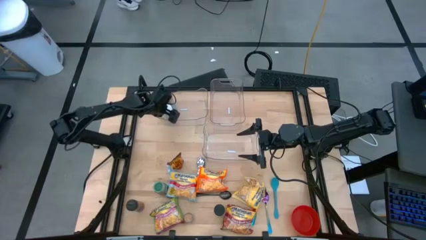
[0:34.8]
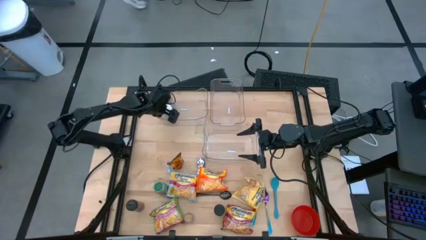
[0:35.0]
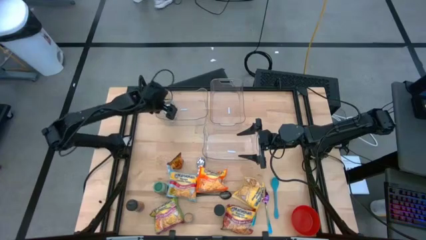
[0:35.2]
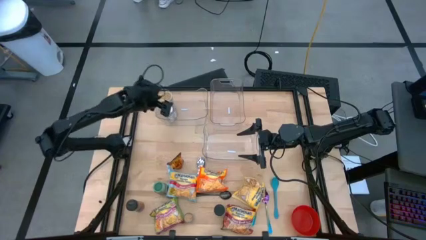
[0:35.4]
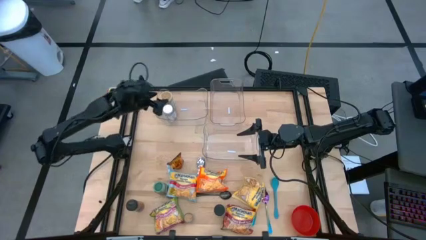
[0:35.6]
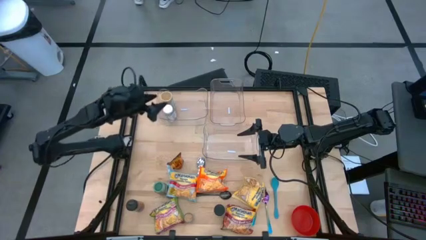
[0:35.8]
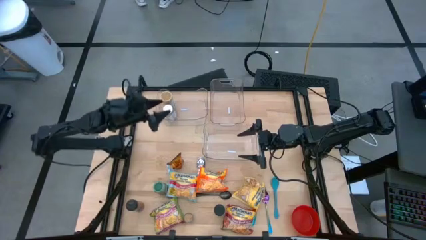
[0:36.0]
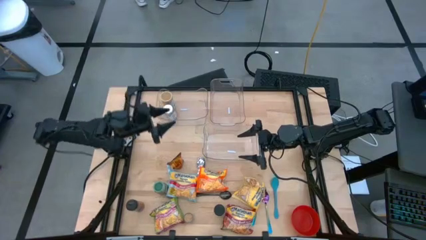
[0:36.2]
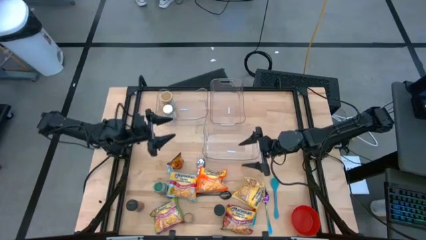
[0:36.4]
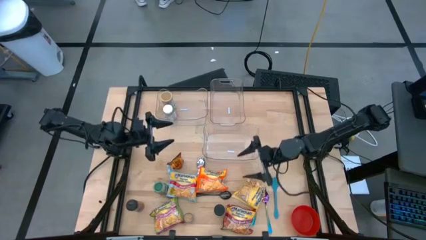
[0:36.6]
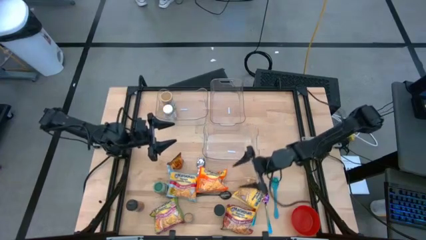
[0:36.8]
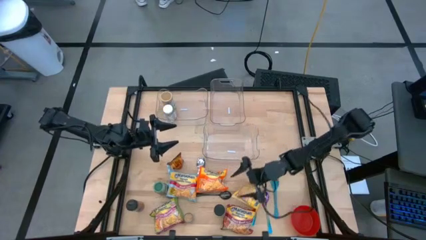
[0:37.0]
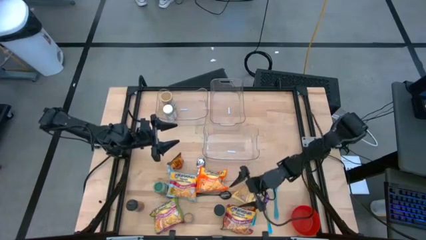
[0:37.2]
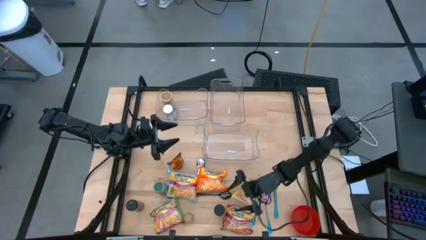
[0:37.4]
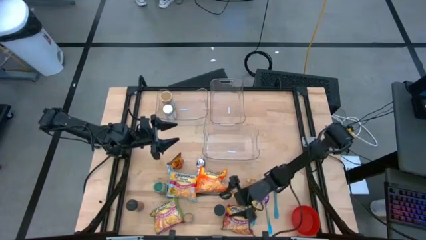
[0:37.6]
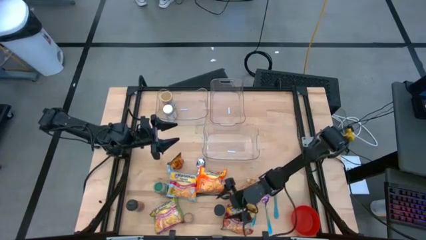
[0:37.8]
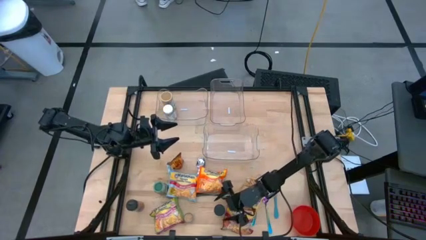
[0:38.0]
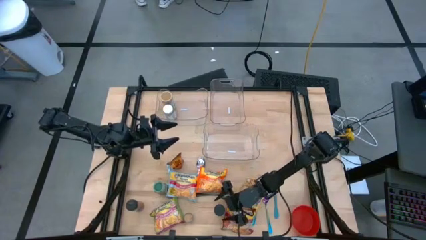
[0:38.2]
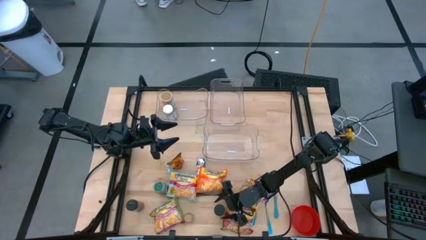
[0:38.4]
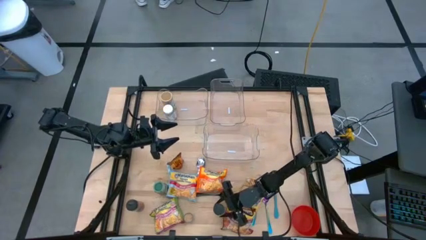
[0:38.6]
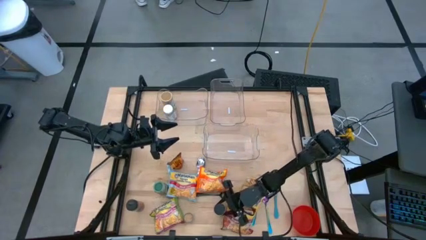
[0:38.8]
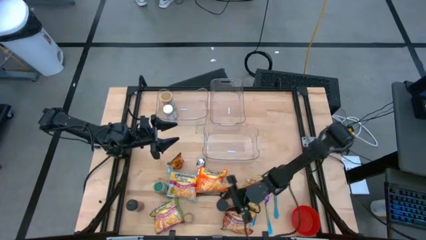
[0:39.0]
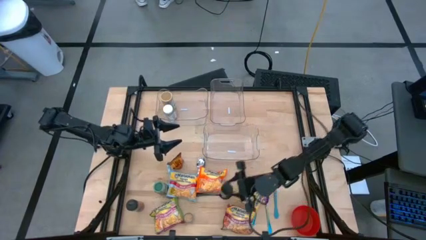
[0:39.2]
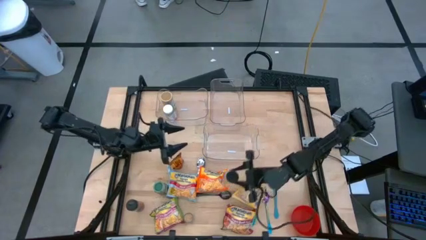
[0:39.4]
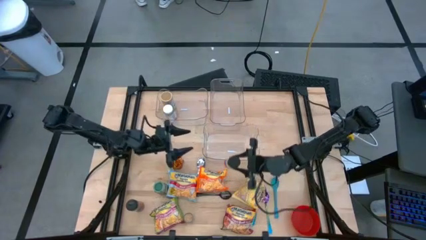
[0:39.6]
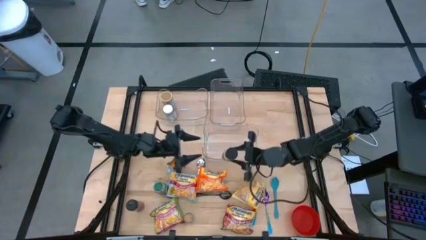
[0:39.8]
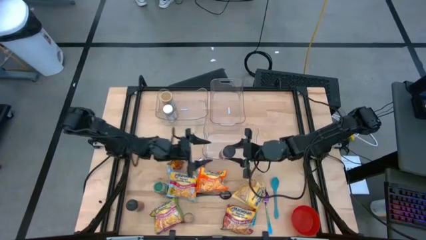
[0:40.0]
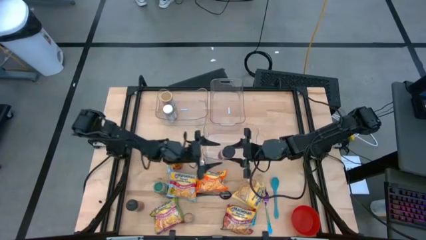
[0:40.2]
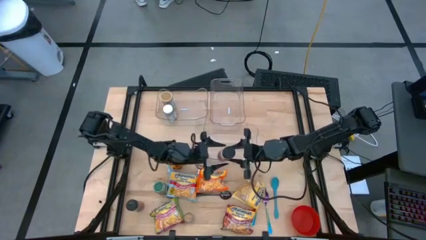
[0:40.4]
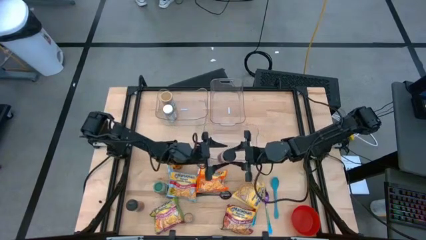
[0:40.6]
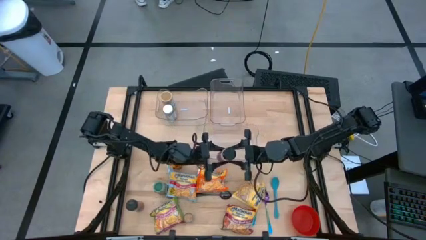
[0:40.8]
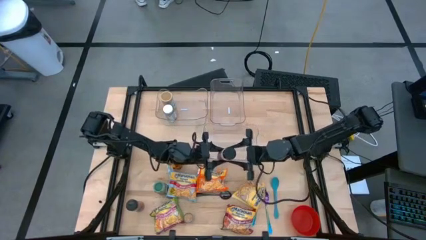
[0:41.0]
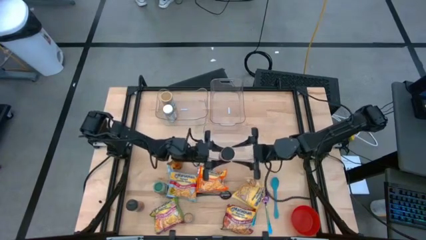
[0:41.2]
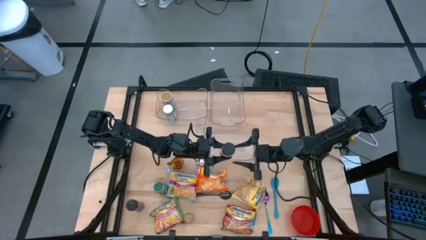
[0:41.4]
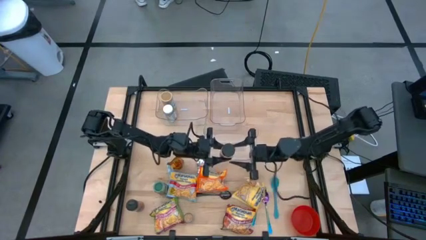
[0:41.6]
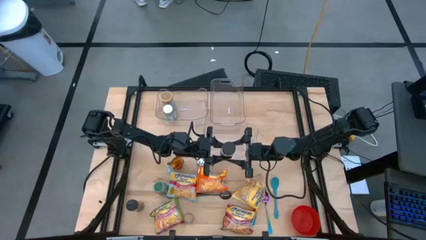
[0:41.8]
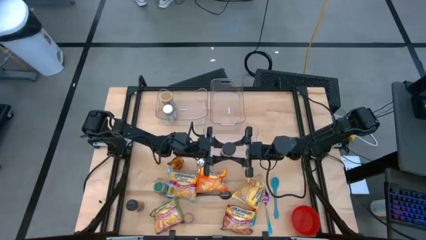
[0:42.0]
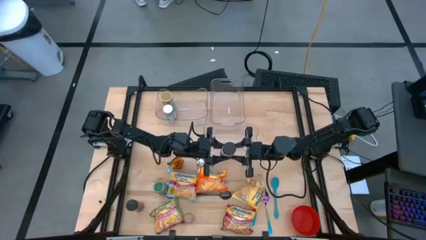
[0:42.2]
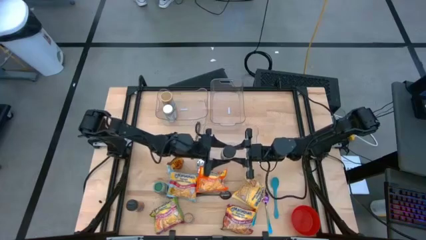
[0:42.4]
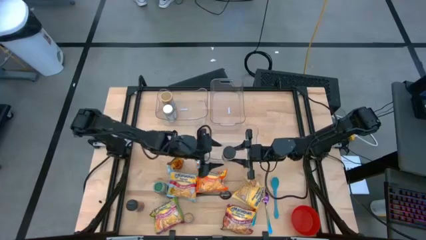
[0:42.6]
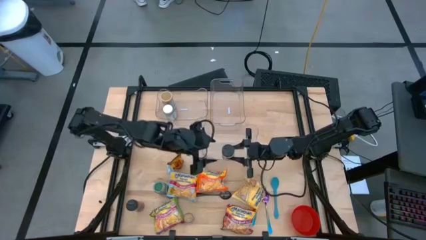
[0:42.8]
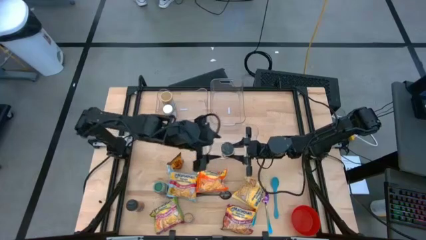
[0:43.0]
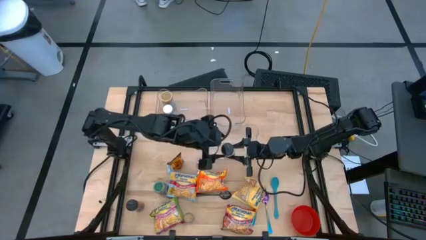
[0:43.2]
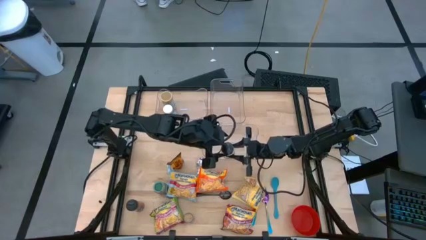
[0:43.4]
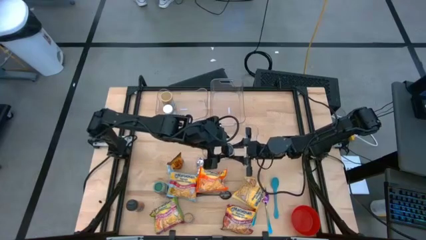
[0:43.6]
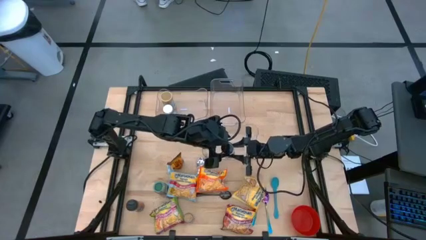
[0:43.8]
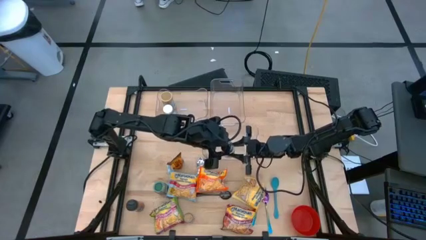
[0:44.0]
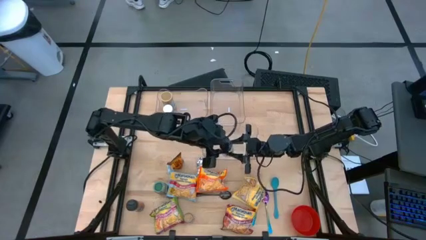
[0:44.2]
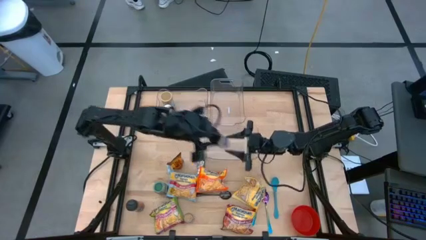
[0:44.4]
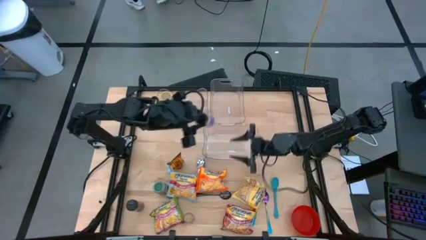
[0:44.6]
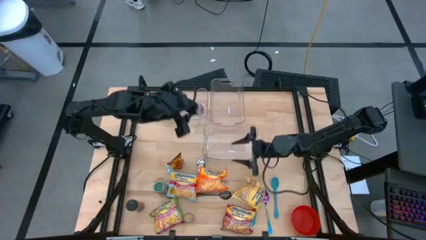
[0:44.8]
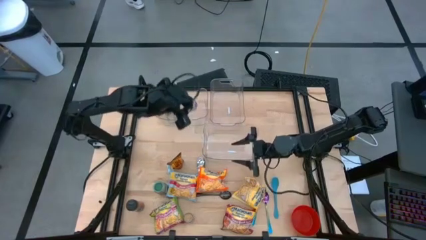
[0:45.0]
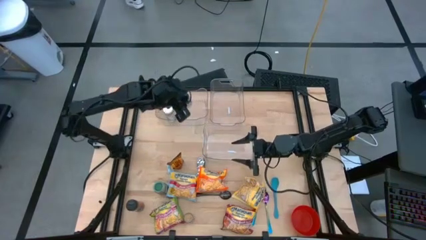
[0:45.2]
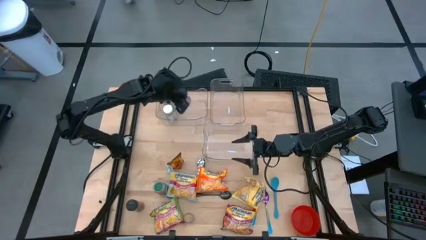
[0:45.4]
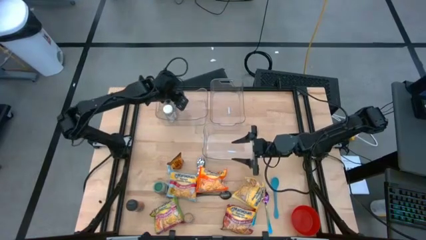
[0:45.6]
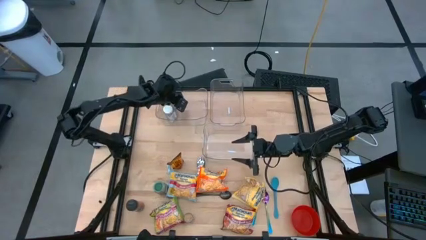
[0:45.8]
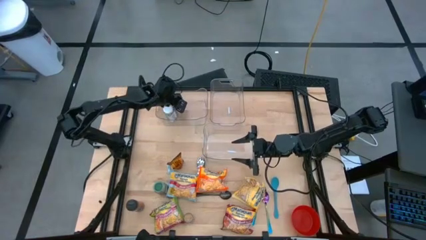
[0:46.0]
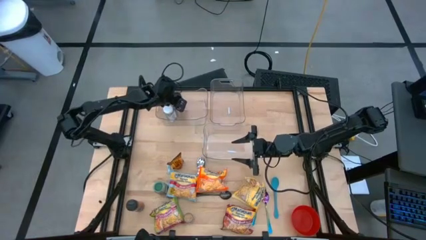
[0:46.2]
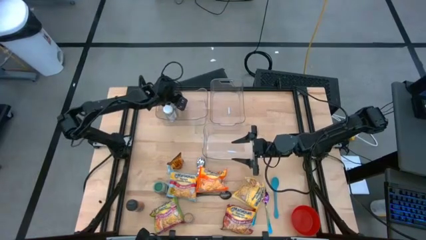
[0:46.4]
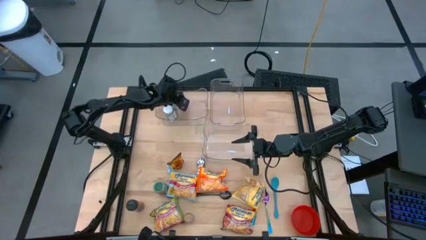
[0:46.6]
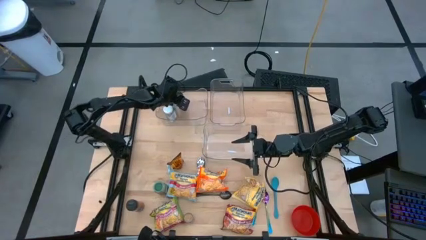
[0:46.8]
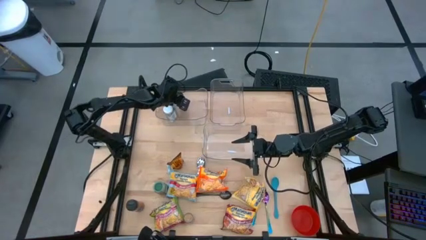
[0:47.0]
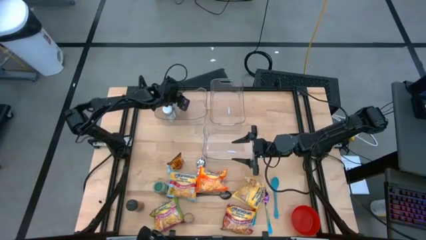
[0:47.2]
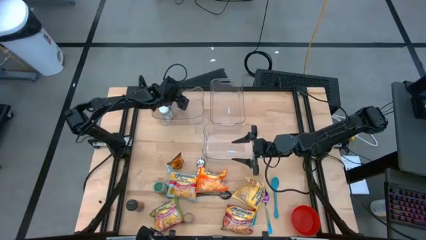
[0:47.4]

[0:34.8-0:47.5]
Task: Pick & Place Food Item
Put the right purple seasoning bottle into the top left transparent container
